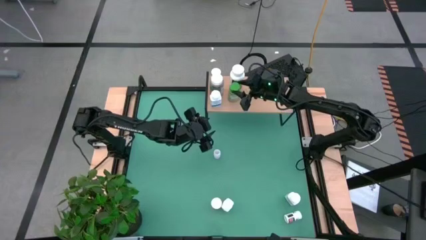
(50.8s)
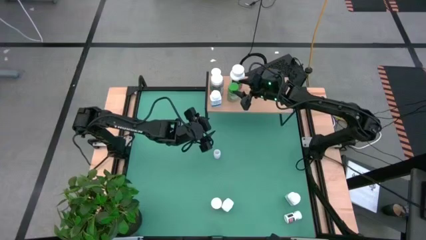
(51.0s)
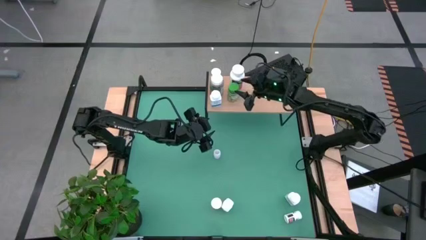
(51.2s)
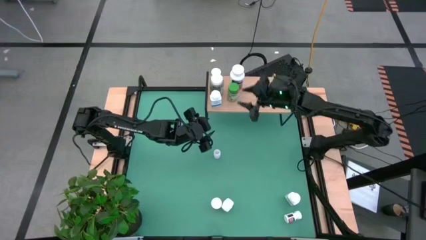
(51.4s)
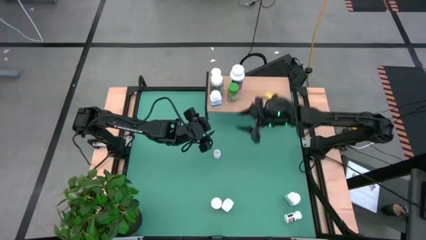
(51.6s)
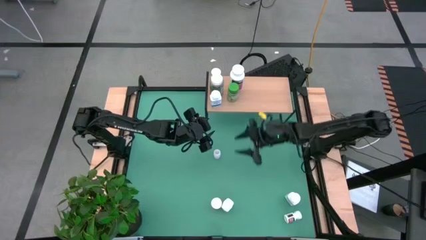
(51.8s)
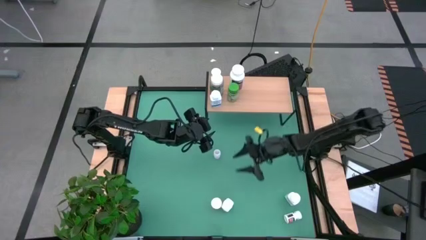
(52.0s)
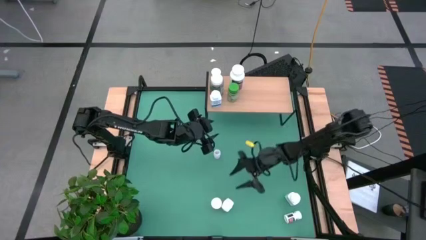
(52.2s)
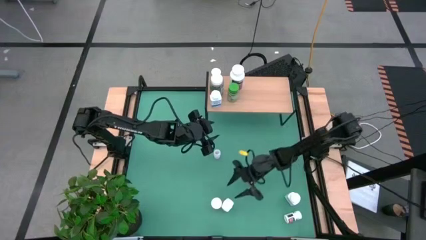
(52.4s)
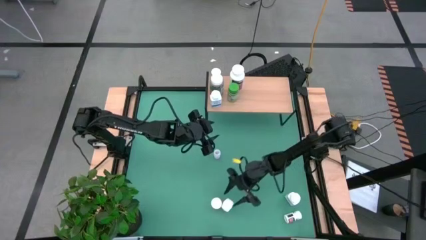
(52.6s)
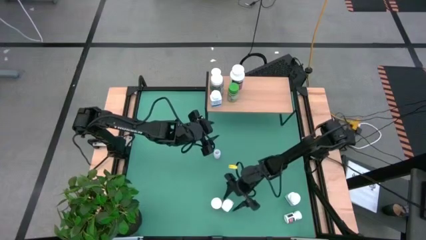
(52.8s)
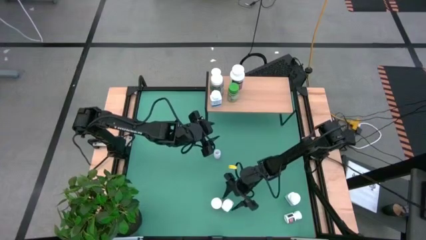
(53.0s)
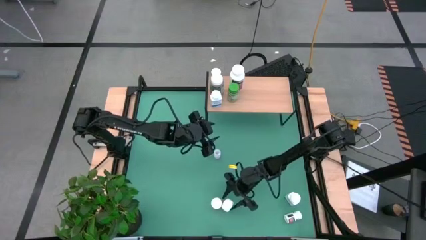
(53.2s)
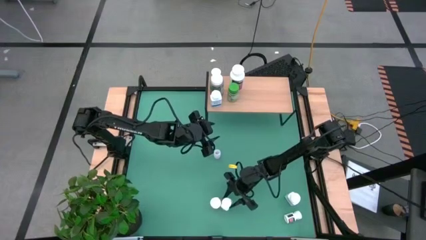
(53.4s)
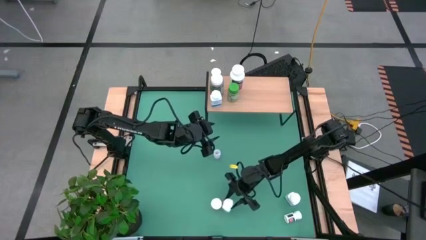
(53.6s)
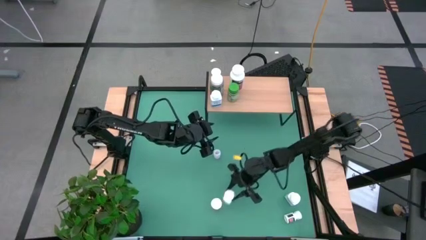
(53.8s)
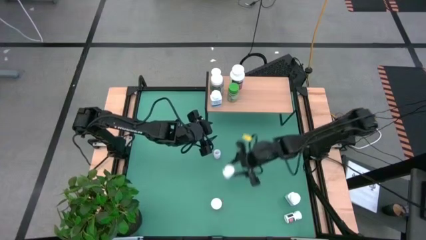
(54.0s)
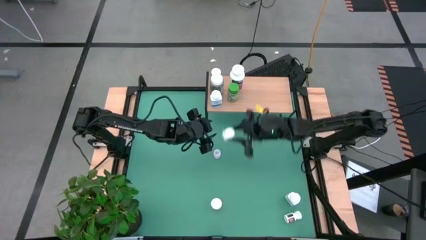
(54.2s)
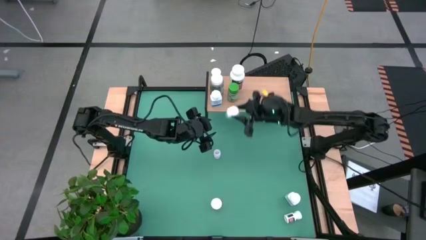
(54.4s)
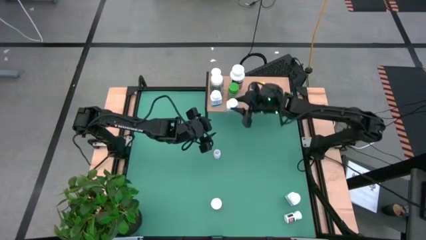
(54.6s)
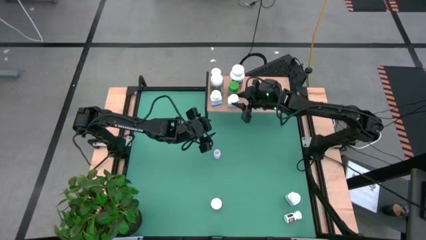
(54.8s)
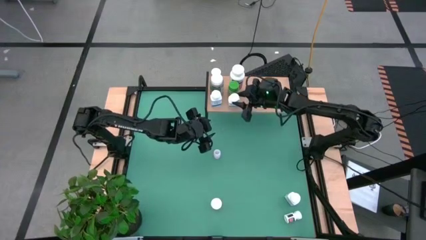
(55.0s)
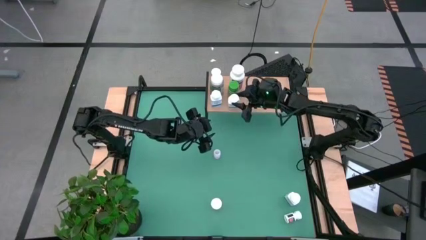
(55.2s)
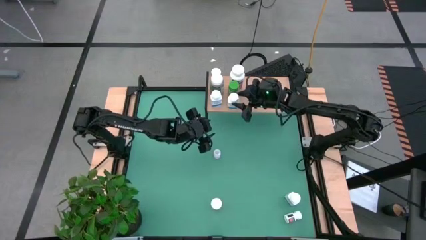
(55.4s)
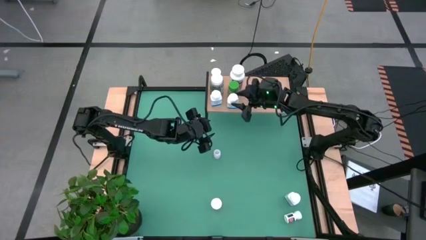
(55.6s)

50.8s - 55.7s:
Task: Pick and place medicine bottles onto shelf by color
Put the left blue and white pill bottle on the shelf

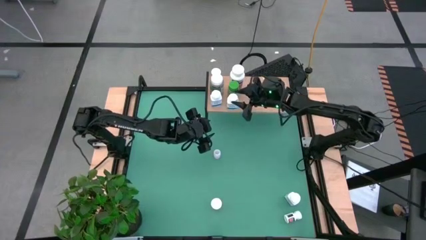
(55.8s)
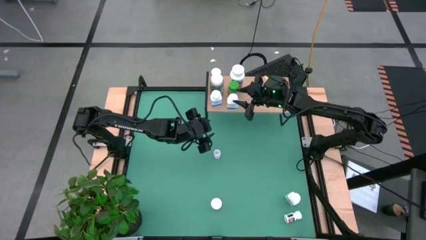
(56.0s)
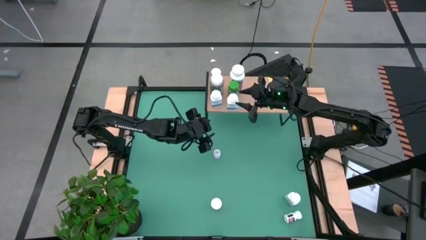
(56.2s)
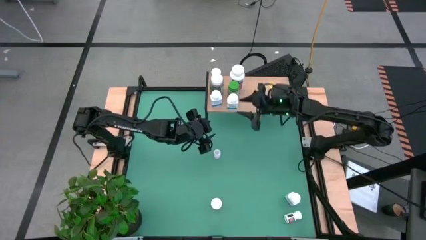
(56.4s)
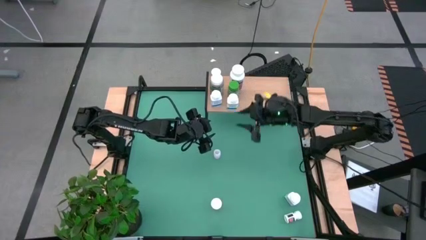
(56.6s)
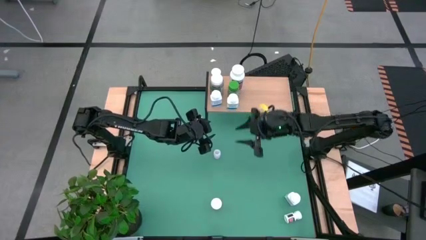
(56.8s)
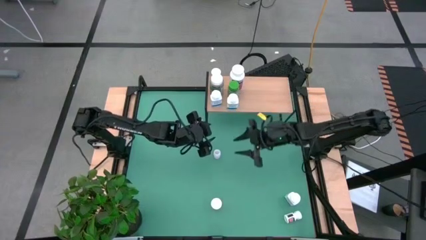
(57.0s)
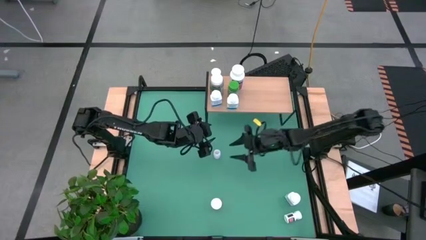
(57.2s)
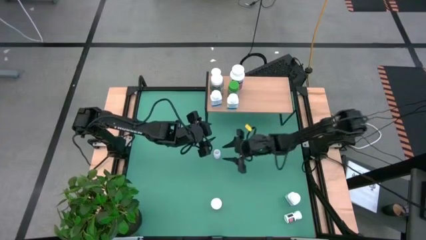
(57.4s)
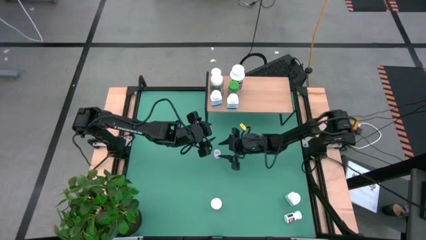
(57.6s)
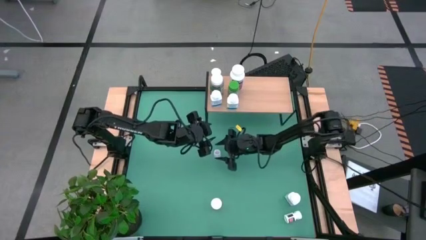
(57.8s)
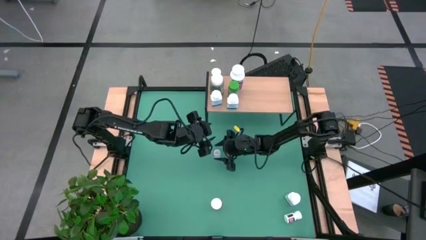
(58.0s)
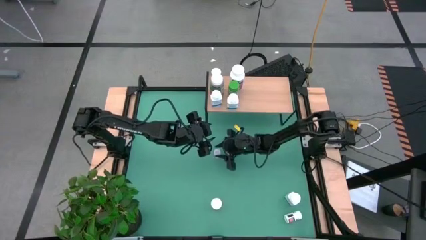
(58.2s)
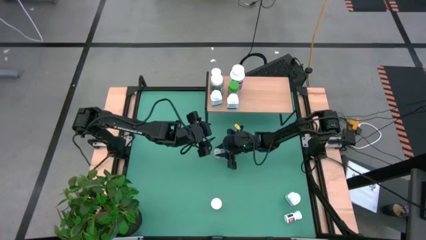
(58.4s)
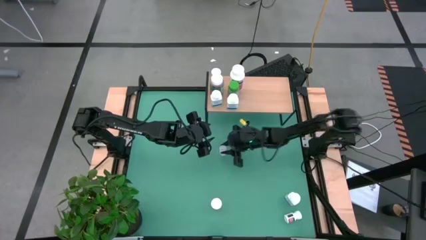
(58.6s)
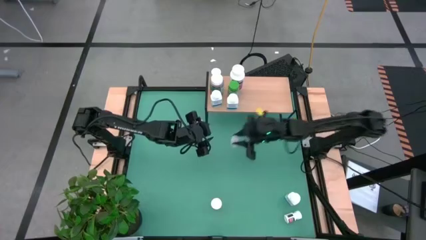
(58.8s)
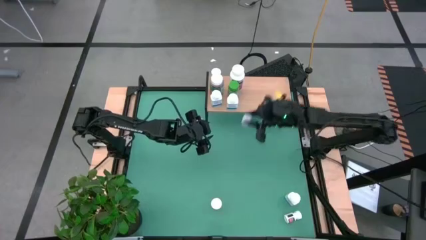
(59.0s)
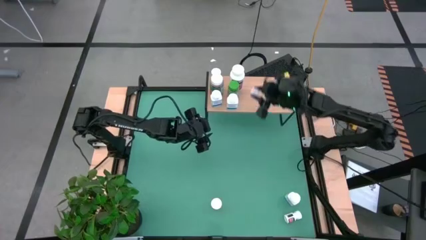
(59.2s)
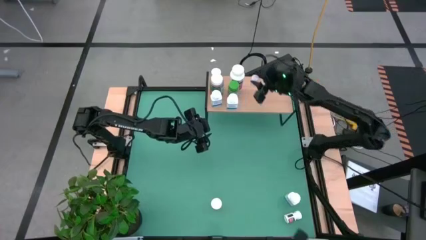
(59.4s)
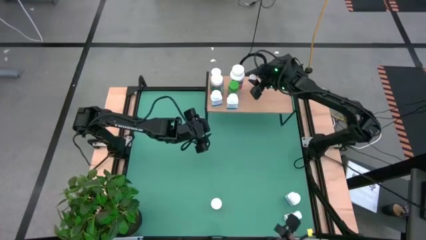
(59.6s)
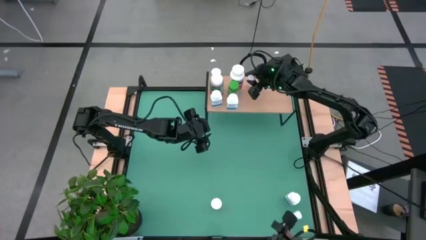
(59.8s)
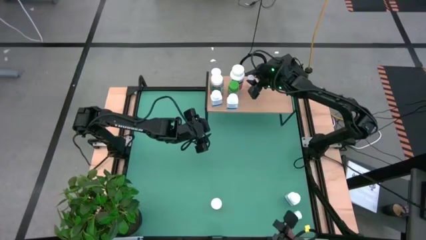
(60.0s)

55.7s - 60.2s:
Put the pink pill bottle on the shelf

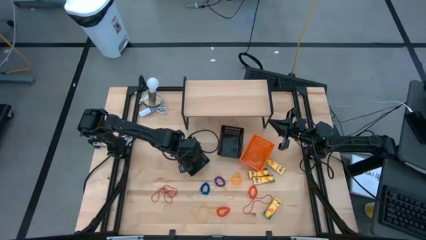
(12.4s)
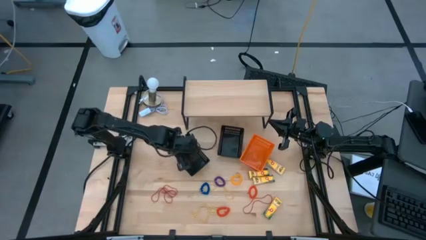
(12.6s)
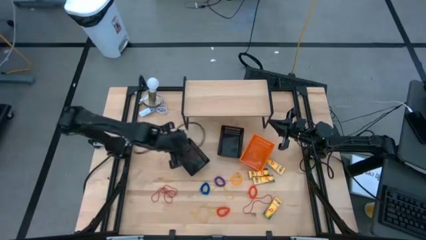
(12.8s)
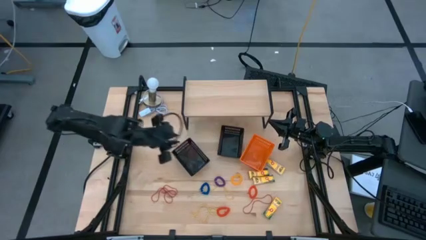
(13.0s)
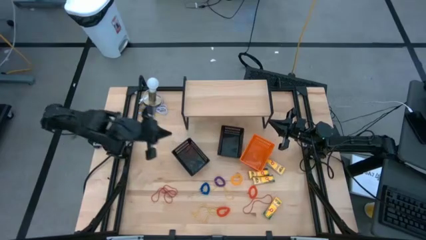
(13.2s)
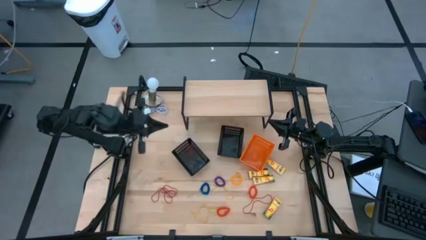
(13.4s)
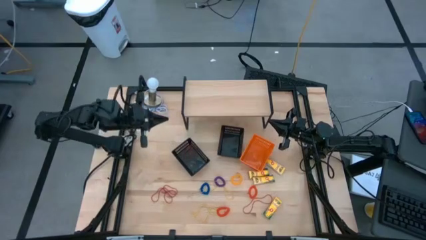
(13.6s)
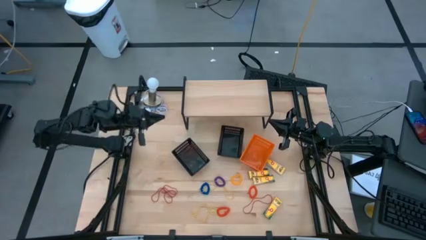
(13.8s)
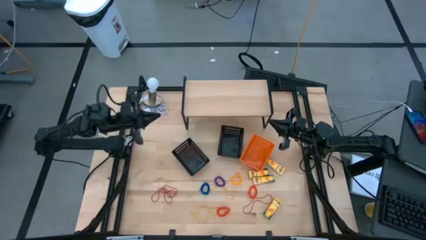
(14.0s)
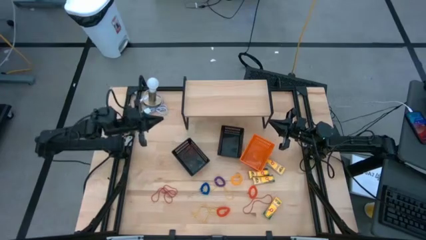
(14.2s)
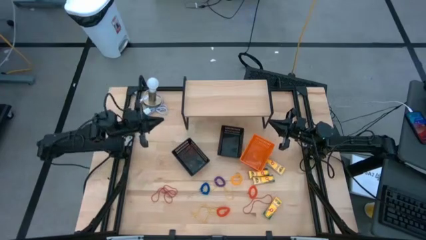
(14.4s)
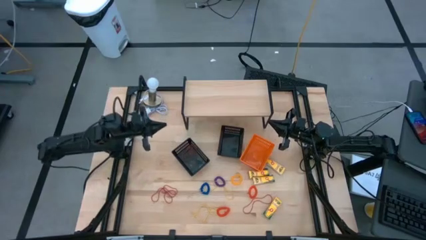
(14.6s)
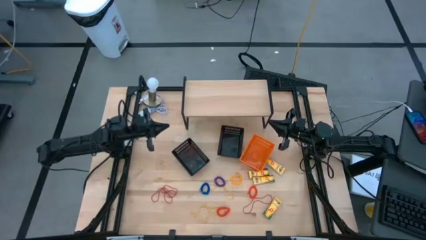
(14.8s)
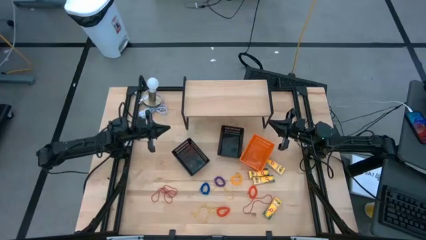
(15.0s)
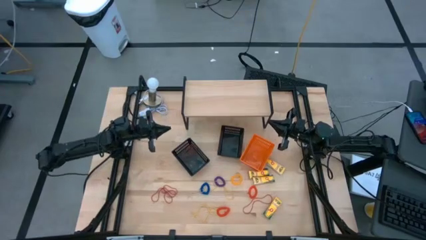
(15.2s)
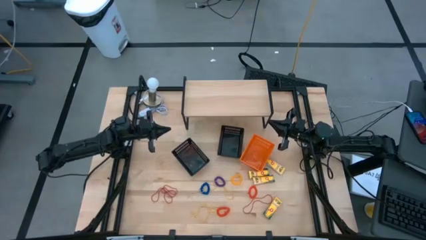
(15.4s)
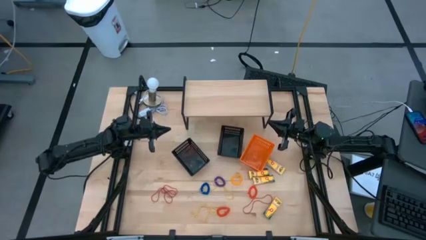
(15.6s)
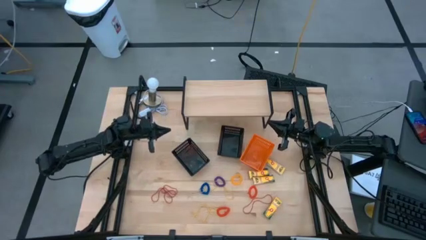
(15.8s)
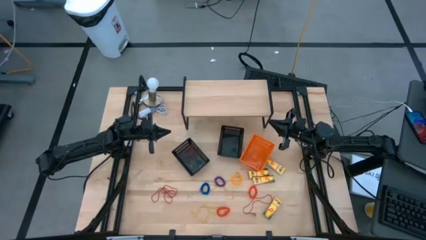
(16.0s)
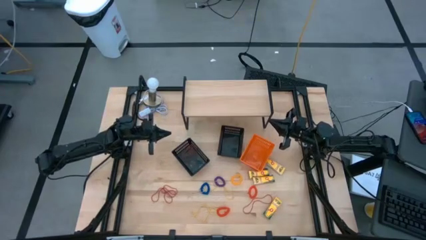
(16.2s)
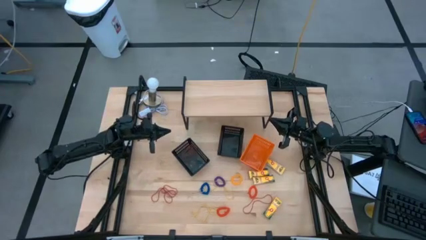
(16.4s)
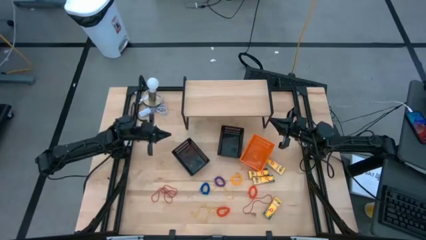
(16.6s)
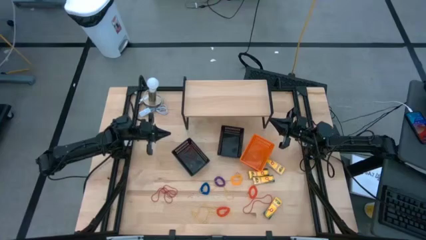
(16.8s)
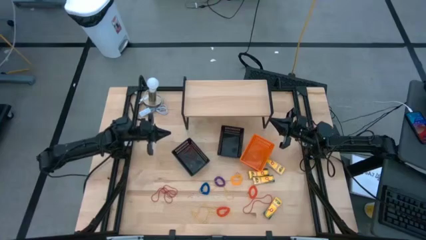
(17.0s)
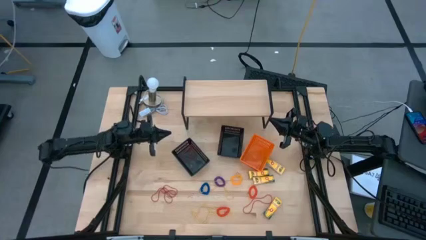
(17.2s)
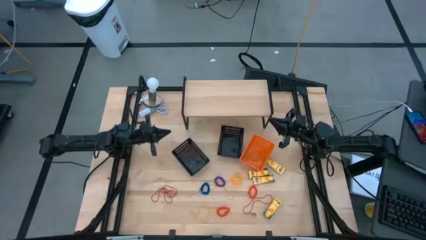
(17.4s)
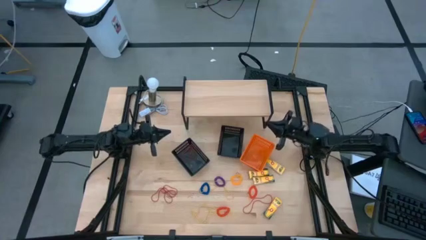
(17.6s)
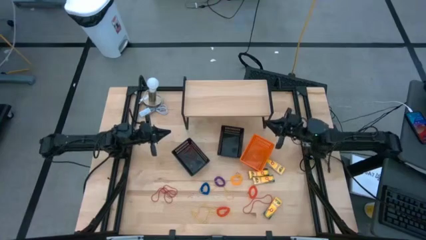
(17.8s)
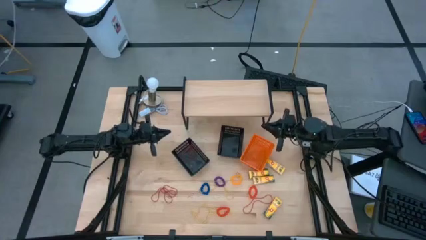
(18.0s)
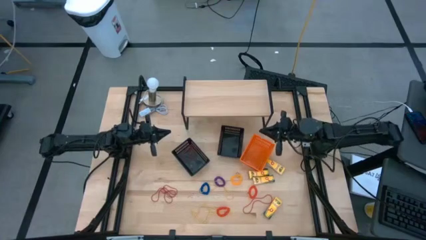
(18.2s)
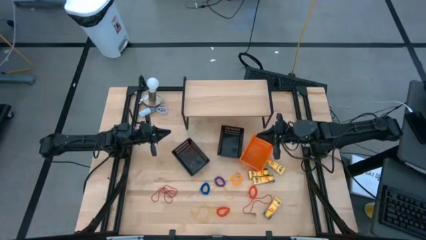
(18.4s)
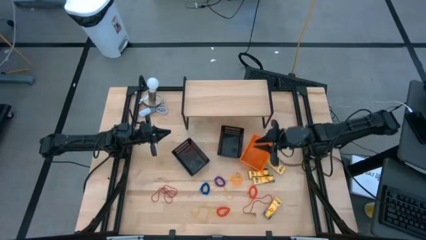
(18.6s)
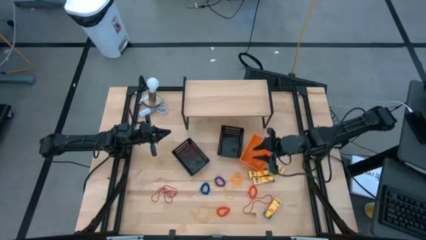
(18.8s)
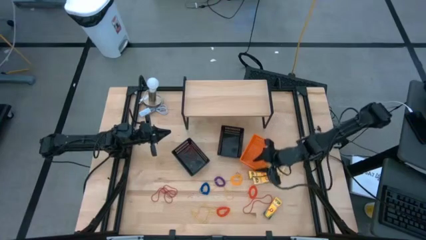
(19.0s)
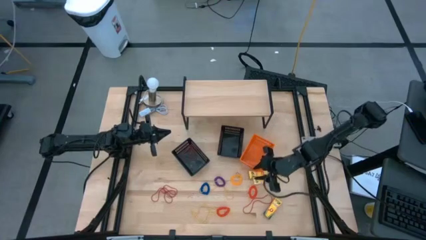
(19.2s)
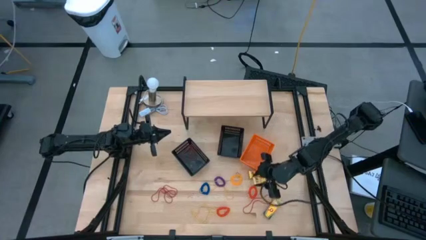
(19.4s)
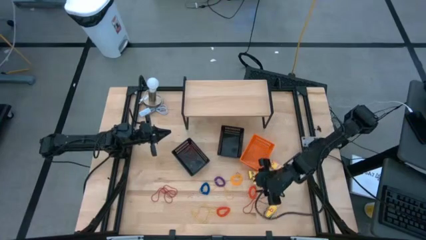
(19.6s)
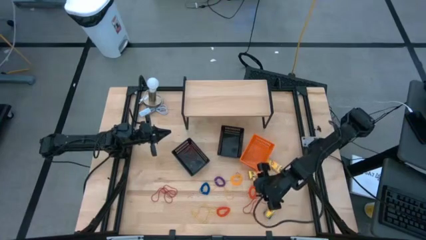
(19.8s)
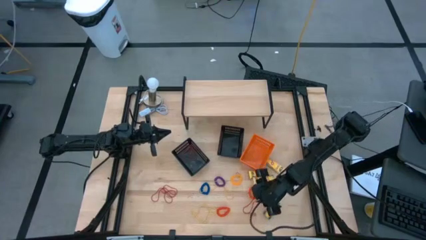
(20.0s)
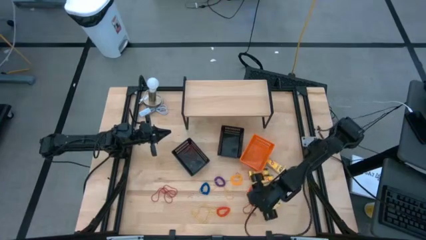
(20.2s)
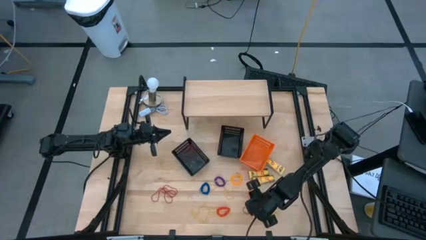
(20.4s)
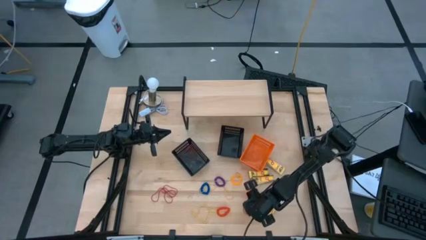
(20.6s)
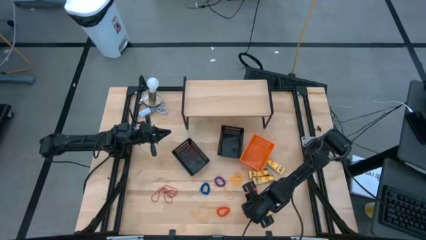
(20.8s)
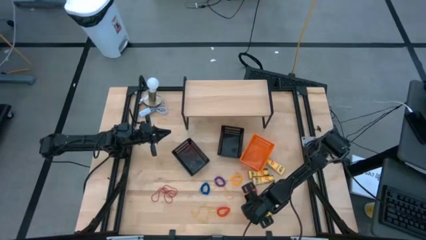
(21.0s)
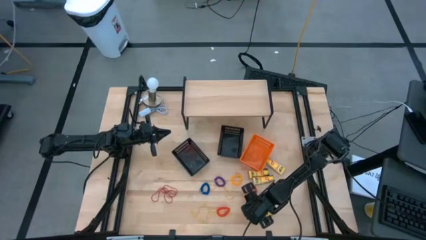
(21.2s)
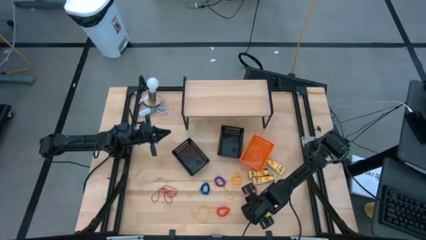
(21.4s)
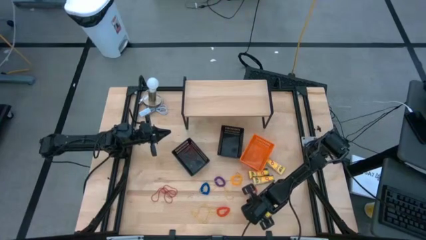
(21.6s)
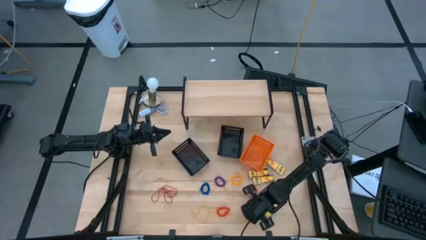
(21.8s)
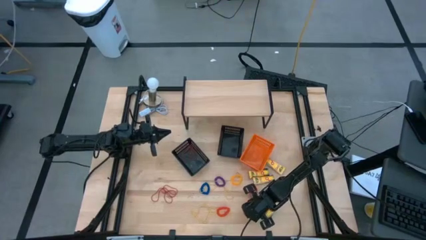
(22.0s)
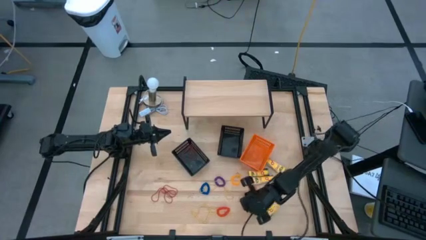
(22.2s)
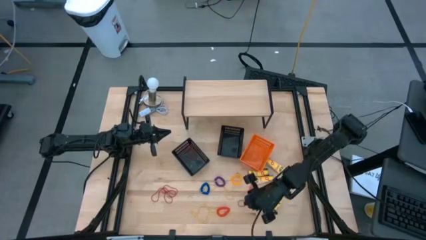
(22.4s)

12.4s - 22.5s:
Task: Pick & Place Office Desk Supplies
Put the red rubber band into the left black bin
